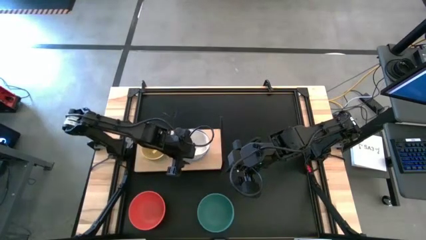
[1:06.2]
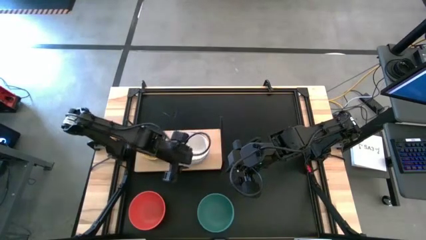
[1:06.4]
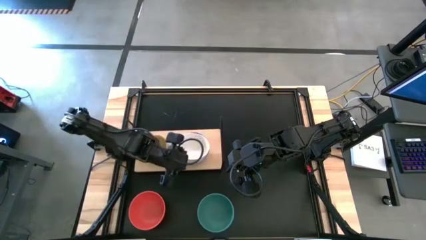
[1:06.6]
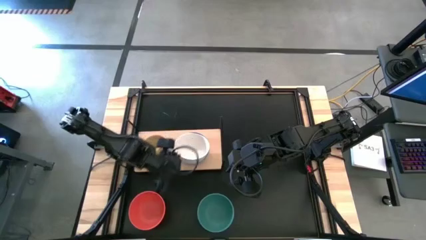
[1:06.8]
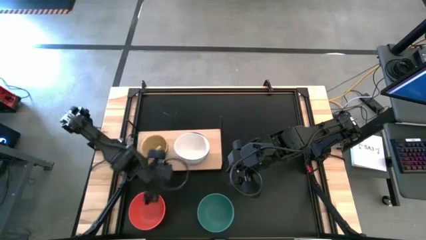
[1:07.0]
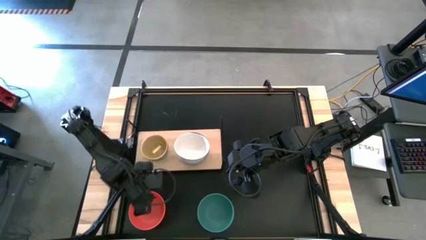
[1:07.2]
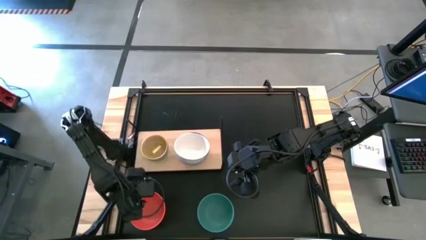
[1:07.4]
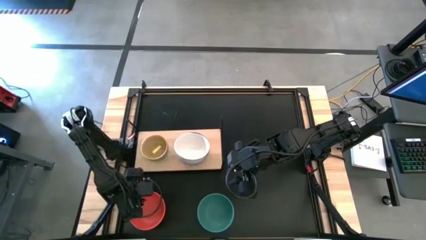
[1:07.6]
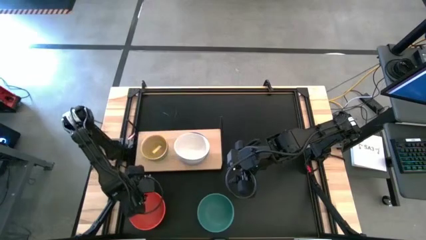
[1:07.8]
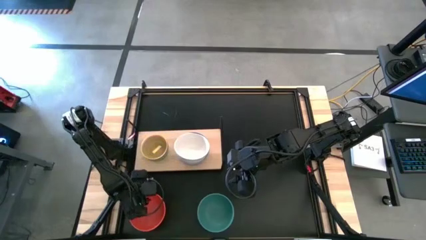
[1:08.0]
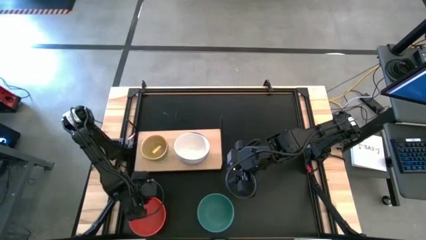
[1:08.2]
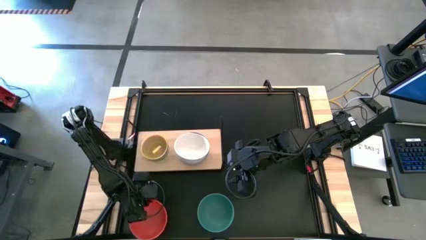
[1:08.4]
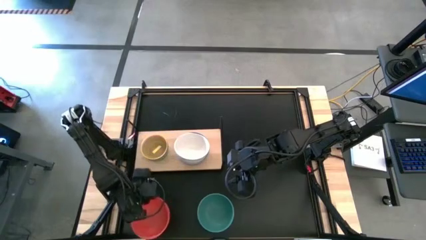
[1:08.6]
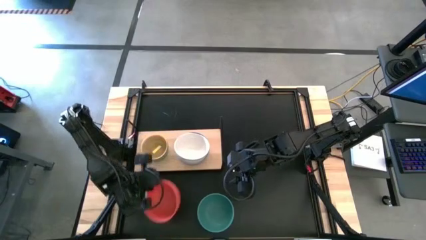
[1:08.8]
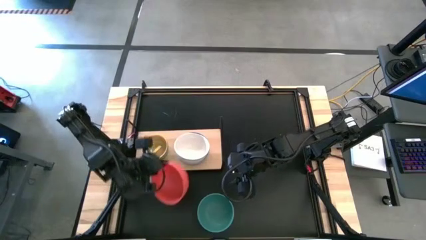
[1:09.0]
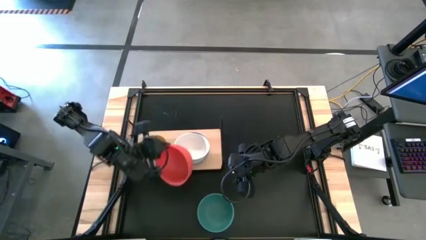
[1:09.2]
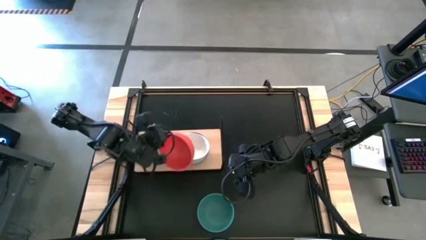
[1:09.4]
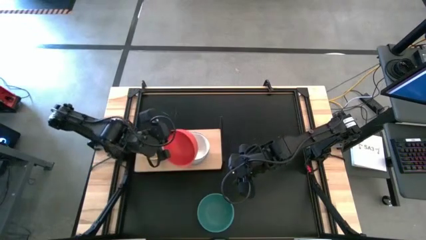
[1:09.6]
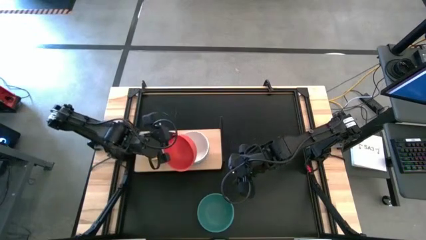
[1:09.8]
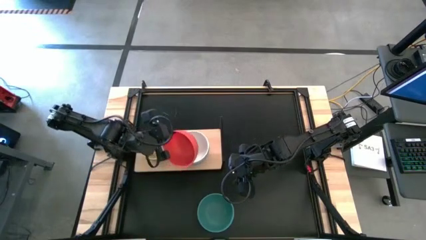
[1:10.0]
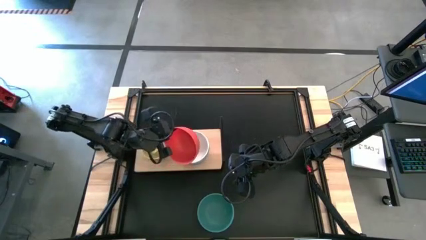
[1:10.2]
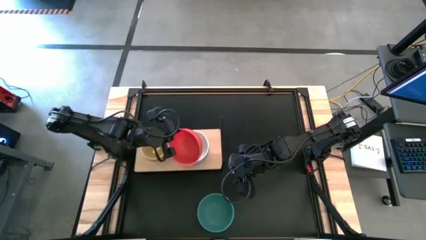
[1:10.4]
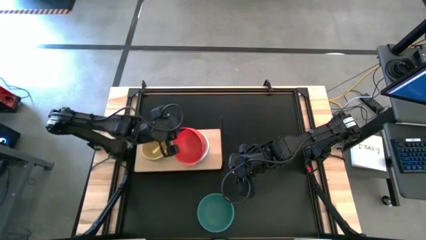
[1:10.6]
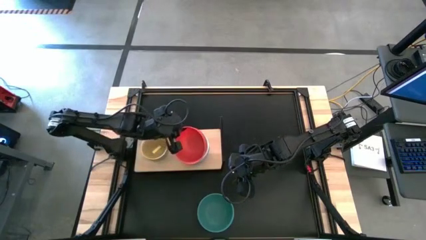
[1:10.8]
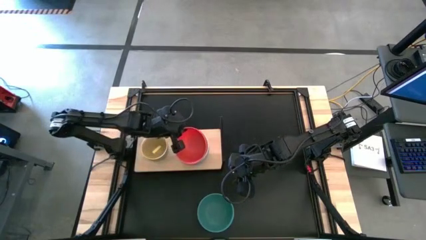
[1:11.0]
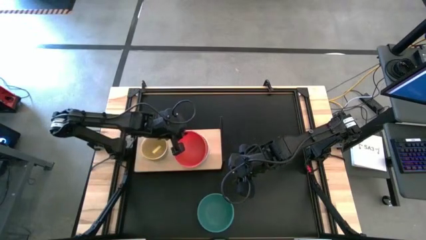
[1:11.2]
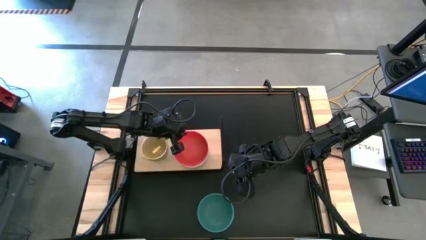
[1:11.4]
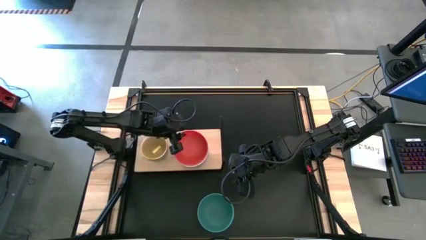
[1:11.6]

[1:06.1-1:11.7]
Task: Place and stack bowls onto a shelf
Stack the large orange bowl on top of the large white bowl on the shelf

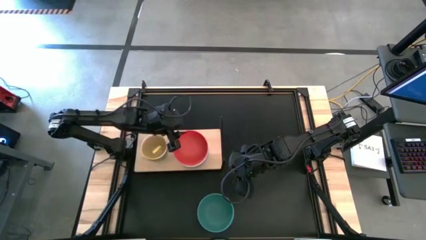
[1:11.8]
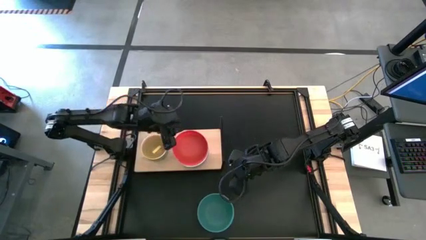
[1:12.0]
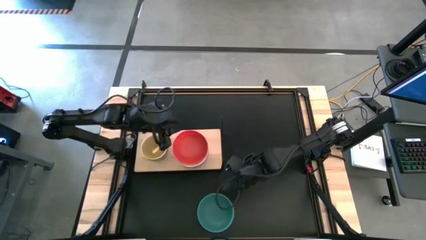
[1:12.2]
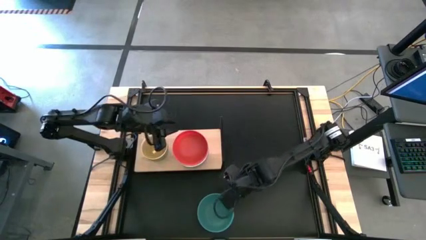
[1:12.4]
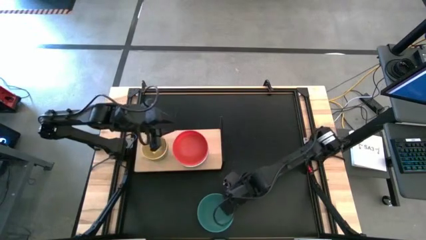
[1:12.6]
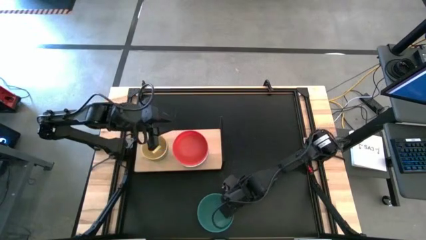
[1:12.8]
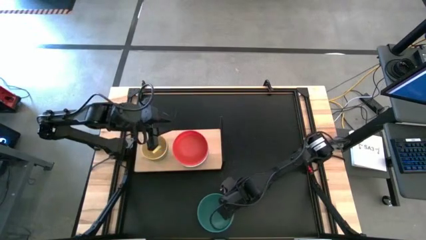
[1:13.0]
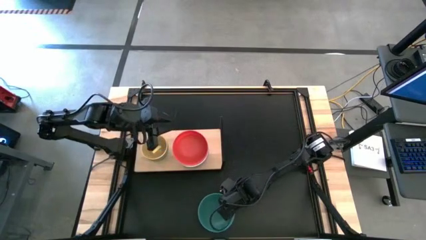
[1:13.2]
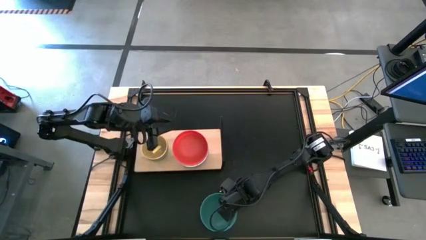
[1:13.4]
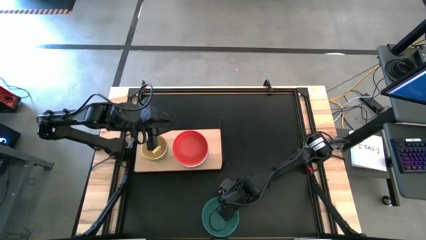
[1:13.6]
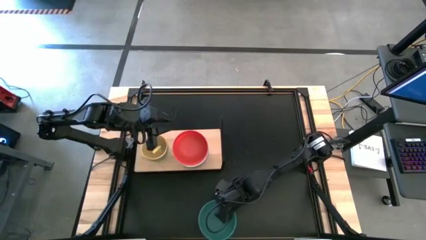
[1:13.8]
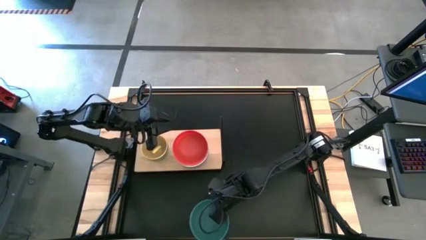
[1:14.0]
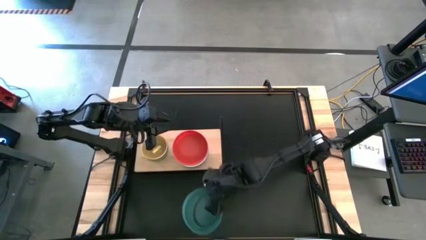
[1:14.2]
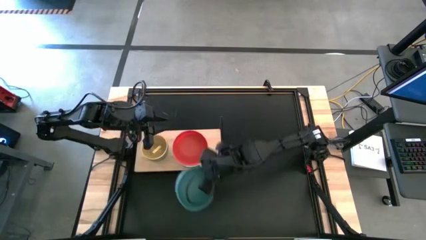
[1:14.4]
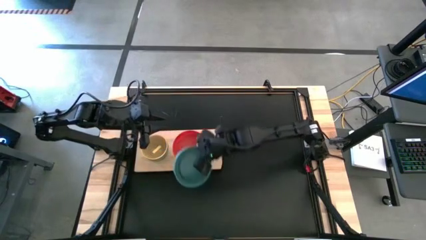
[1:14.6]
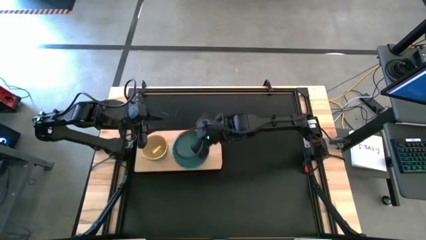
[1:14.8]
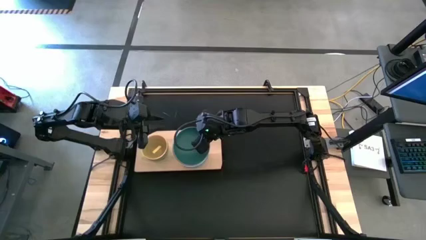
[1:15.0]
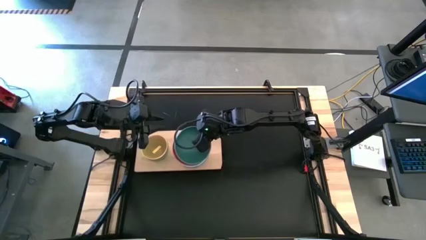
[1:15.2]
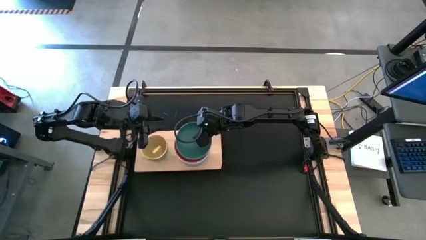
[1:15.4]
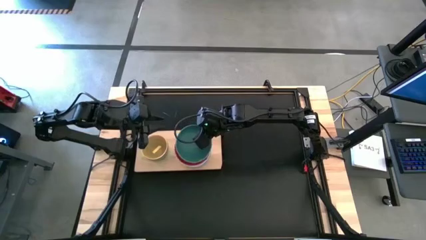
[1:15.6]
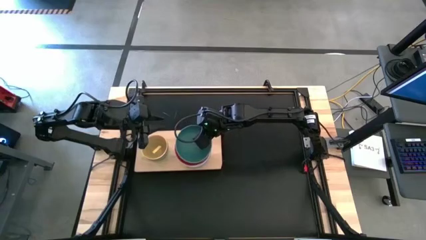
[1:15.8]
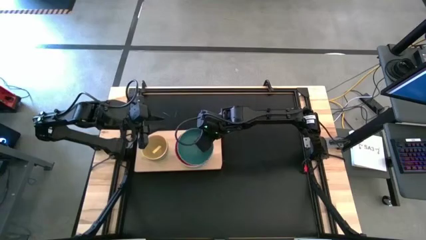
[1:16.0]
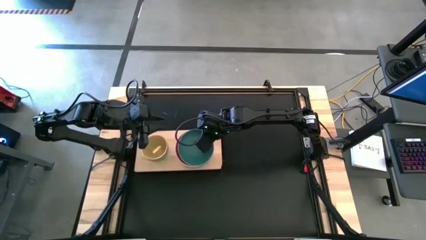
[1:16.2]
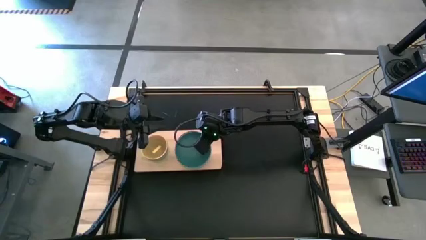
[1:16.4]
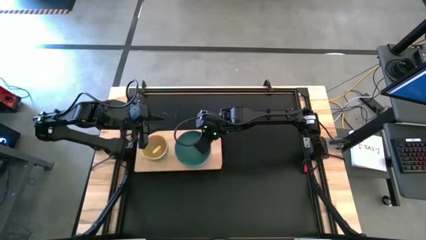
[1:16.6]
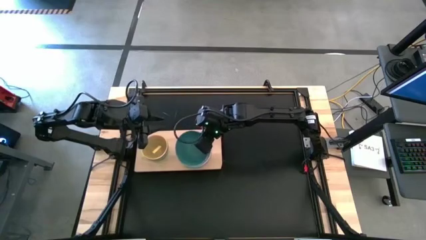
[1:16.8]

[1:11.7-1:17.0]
Stack the large green bowl on top of the large orange bowl on the shelf

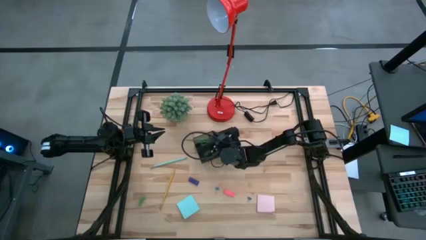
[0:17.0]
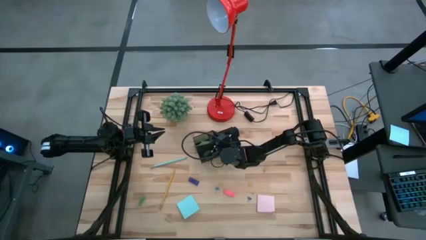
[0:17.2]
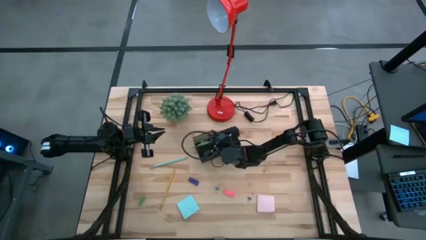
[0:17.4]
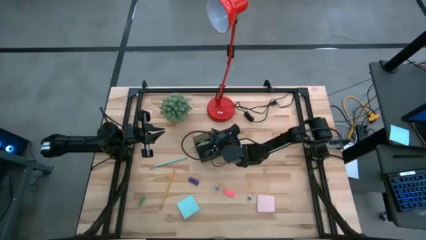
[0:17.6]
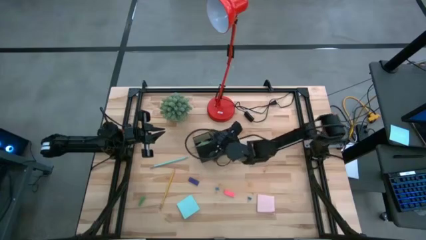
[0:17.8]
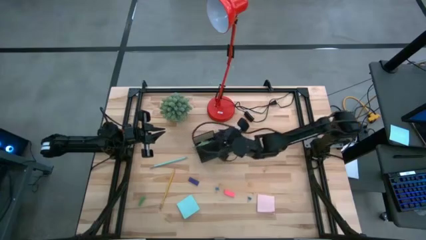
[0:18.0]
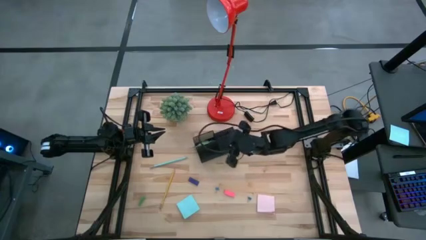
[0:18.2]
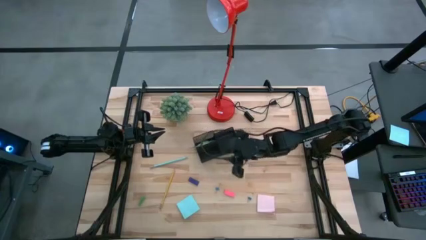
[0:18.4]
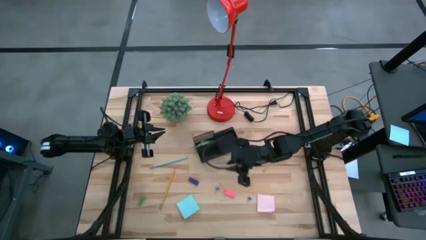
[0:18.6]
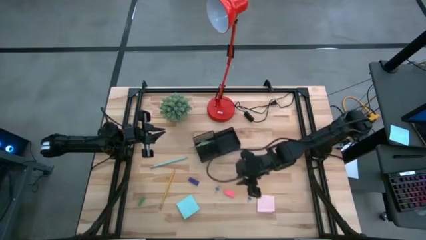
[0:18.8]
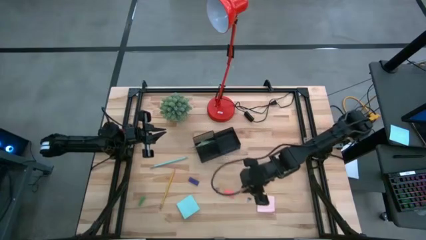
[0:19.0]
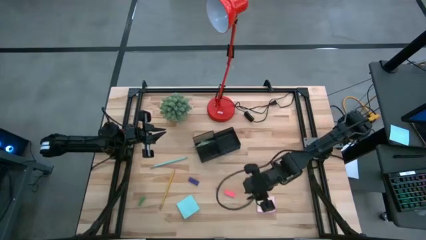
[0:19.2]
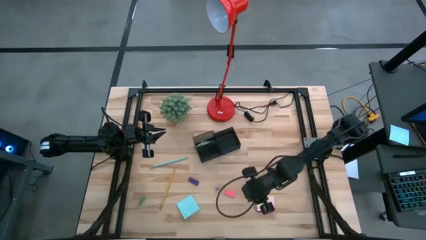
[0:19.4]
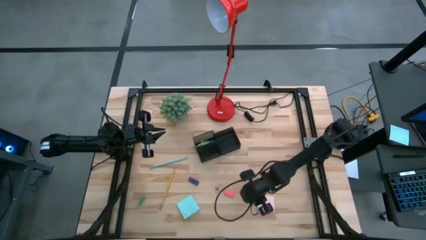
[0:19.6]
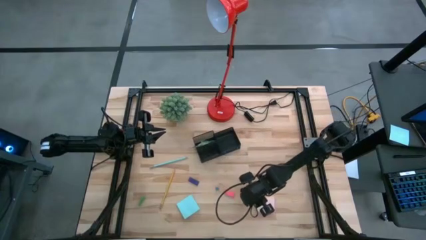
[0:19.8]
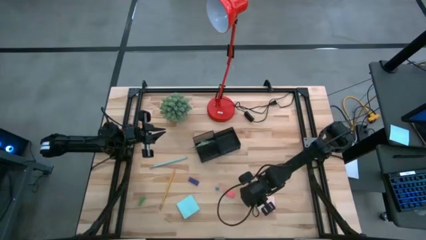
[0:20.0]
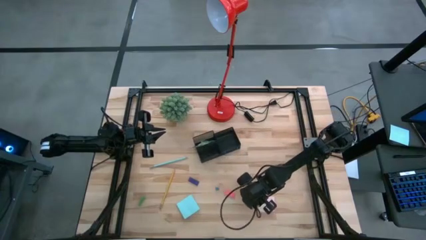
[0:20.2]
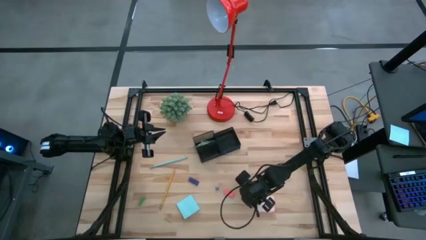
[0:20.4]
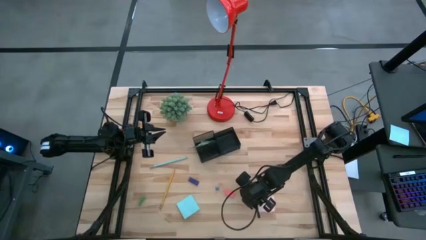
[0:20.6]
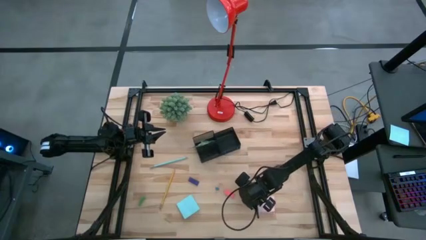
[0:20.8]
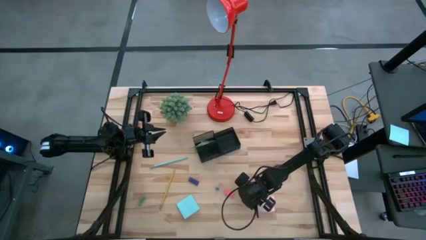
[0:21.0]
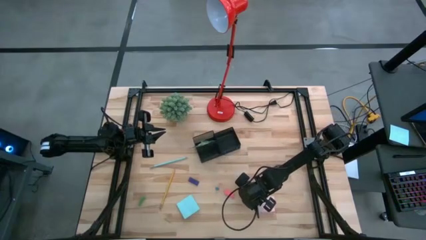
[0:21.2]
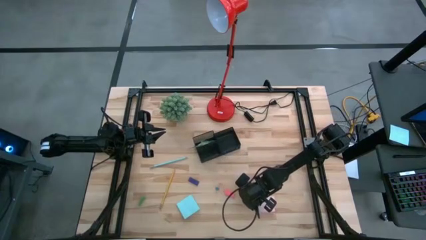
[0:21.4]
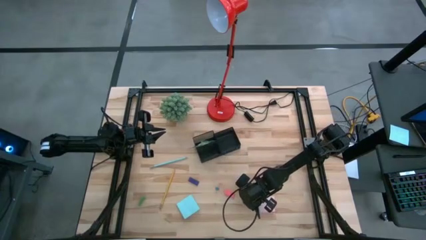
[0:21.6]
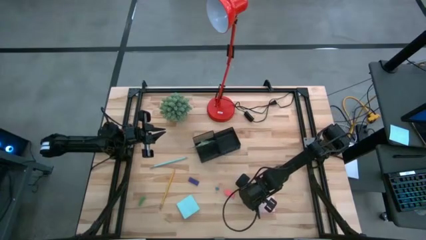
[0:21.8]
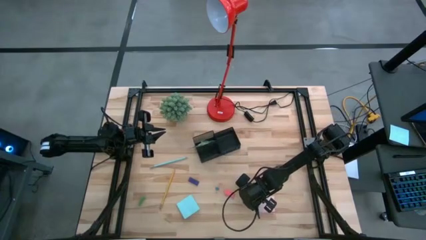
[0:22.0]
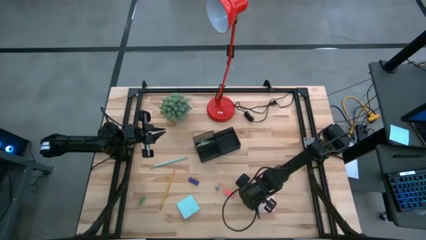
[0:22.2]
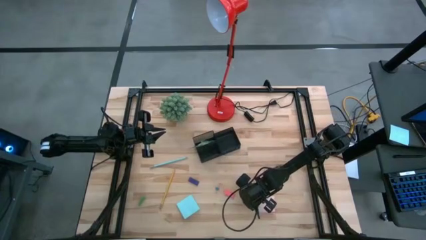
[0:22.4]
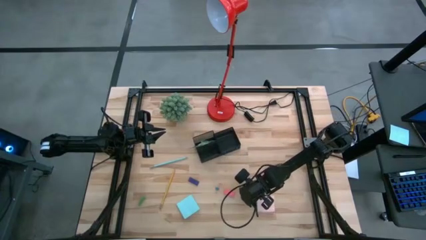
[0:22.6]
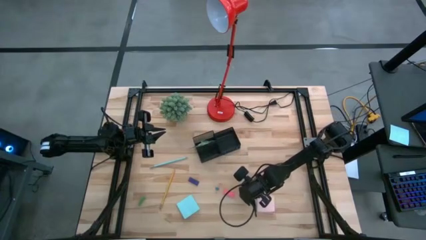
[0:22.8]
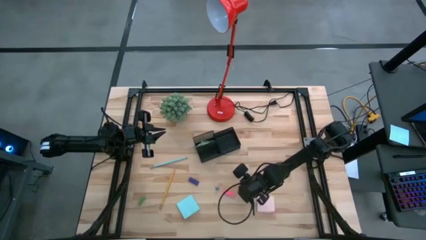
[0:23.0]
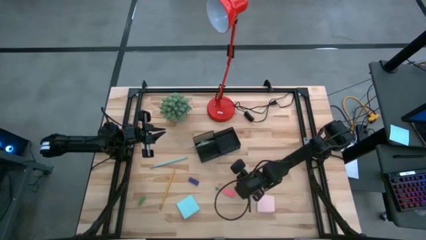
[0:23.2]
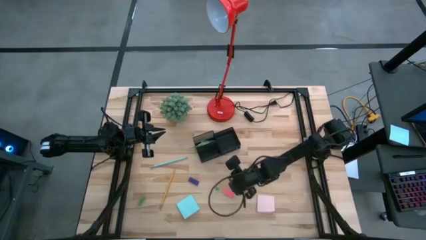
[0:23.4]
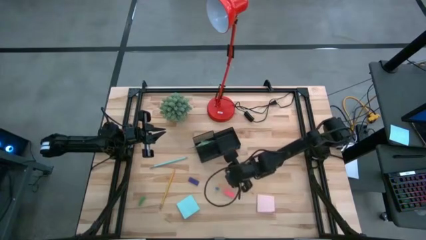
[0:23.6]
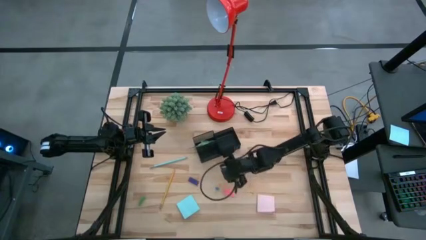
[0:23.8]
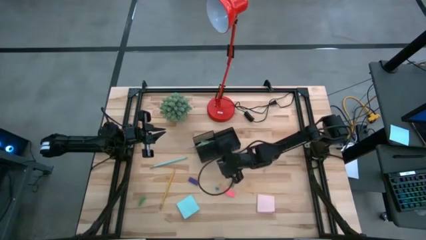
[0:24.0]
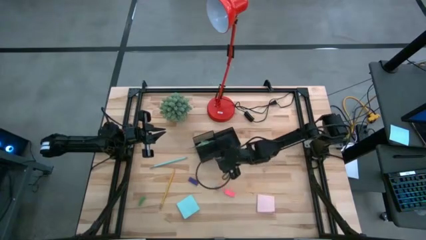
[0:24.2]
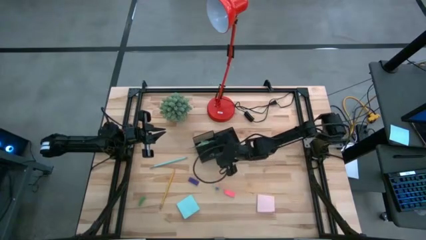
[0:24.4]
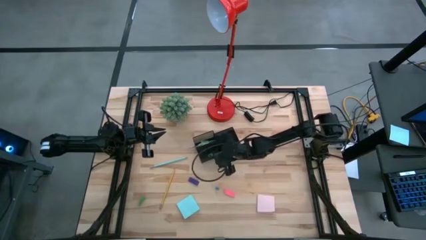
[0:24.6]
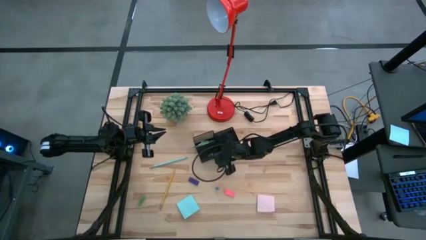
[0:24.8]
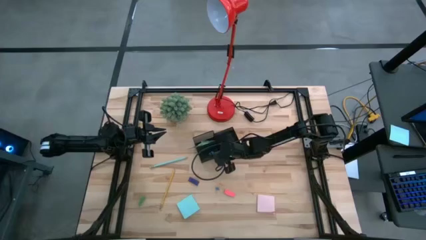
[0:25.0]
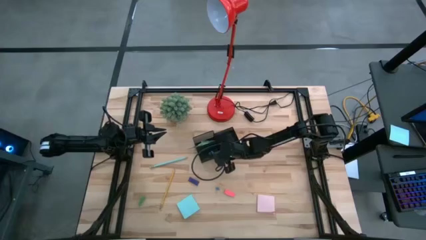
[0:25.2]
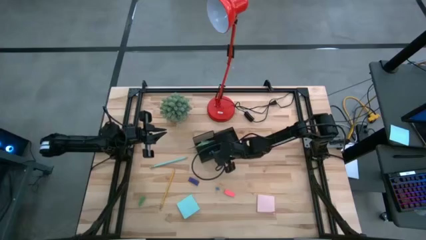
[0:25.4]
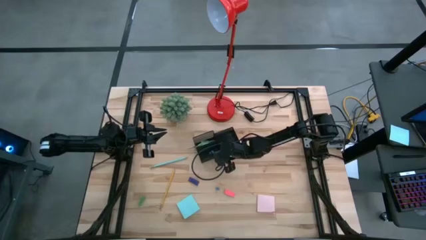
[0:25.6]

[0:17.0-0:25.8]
Task: Pick and place office supplies into organizer
Put the right blue binder clip into the black desk organizer
